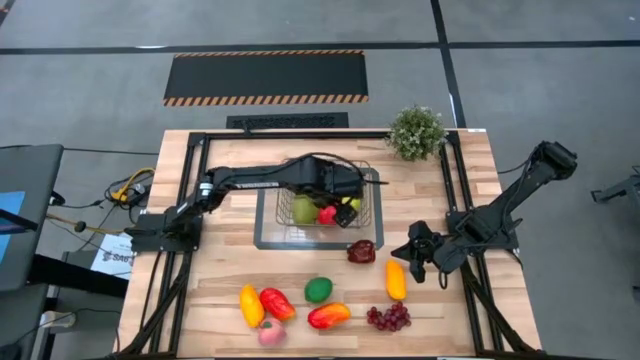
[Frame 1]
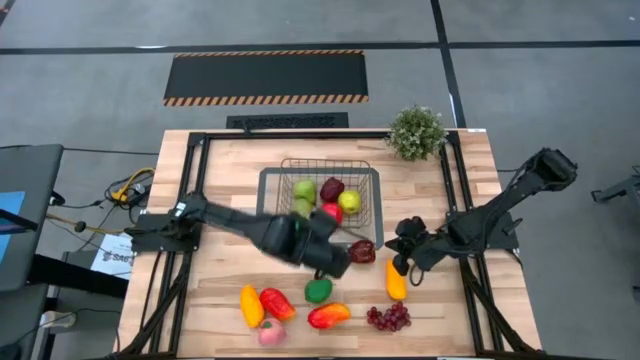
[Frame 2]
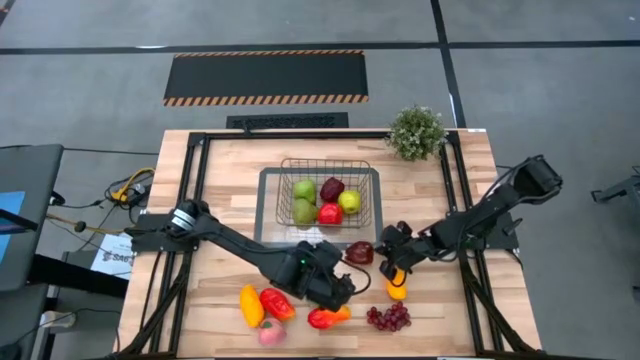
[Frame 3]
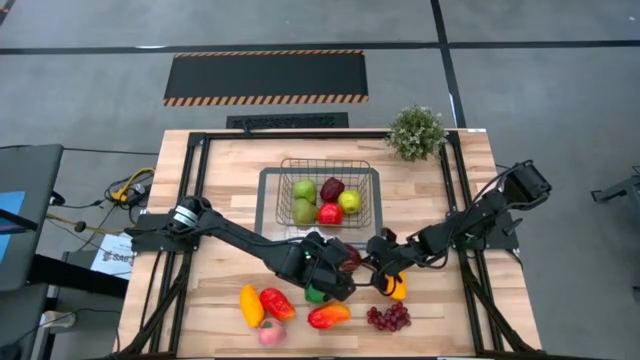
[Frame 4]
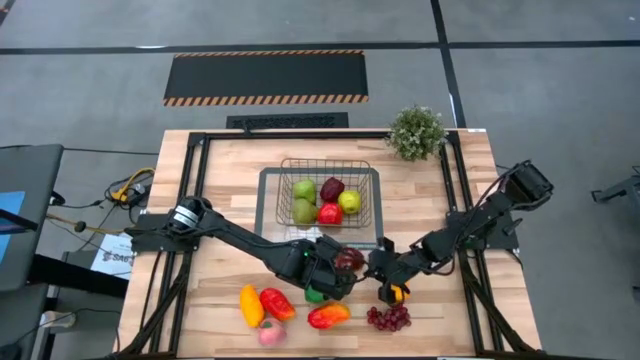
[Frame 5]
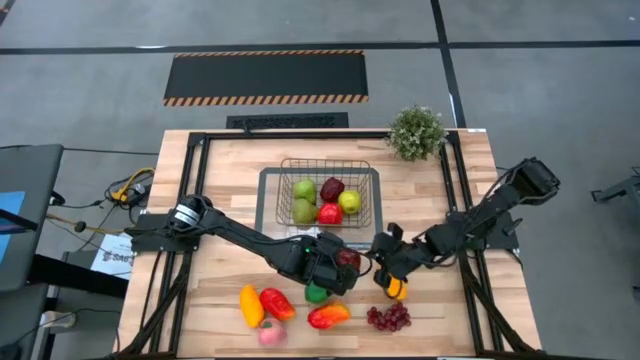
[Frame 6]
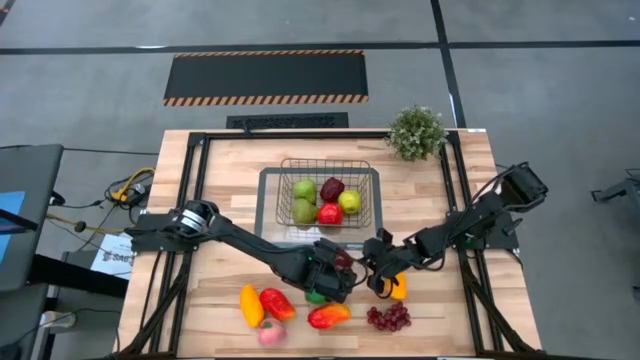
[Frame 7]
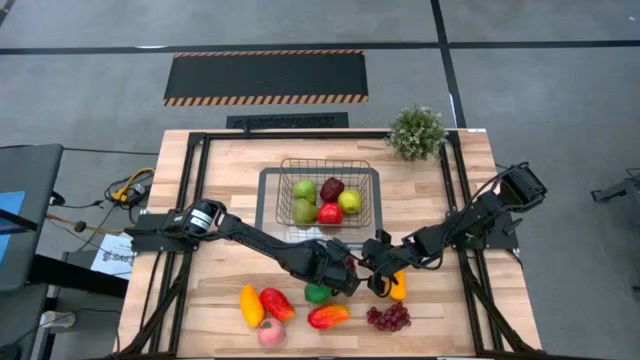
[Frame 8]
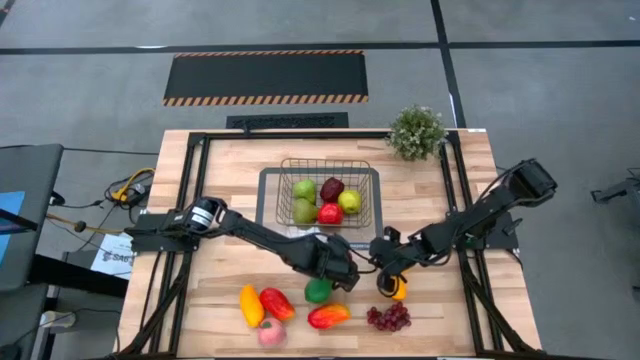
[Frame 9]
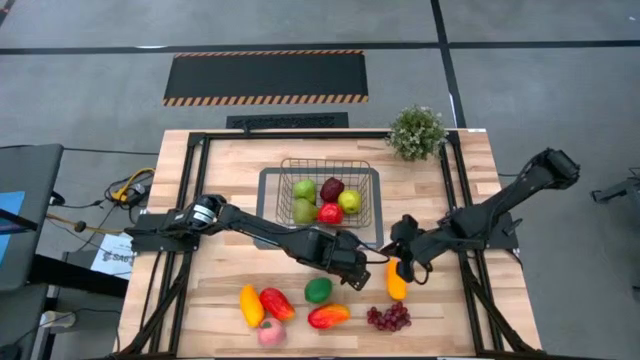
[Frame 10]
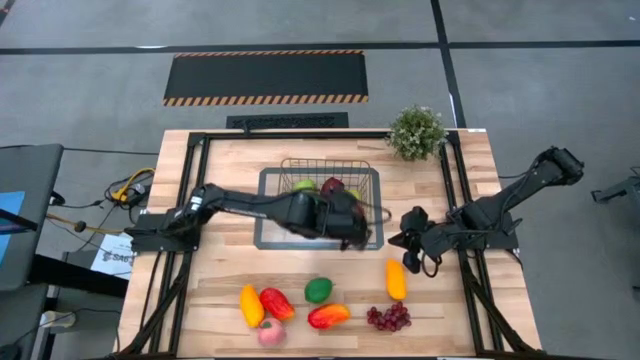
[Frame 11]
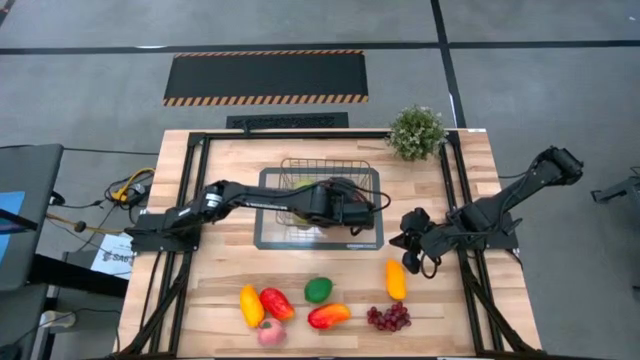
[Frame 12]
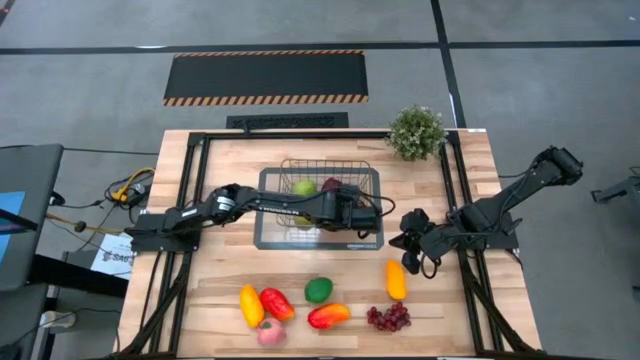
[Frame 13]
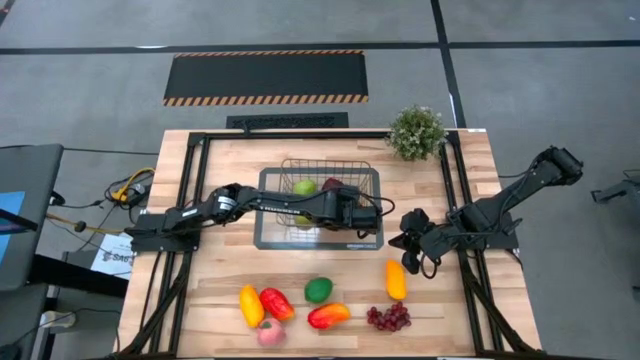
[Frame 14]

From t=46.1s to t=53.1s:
Task: Build produce basket
Put the dark red apple into the bin

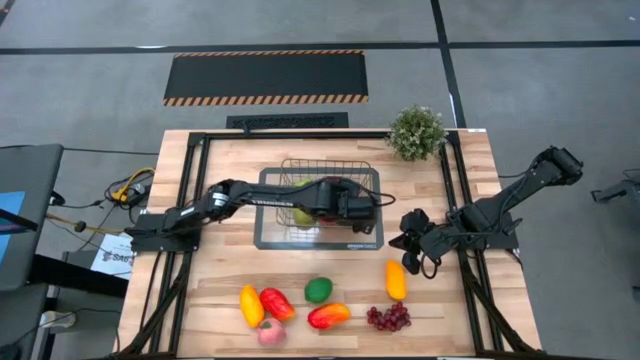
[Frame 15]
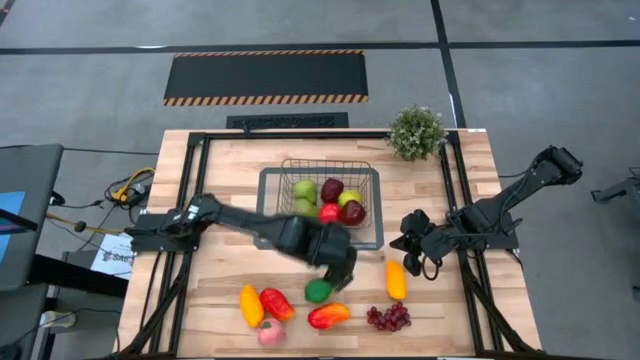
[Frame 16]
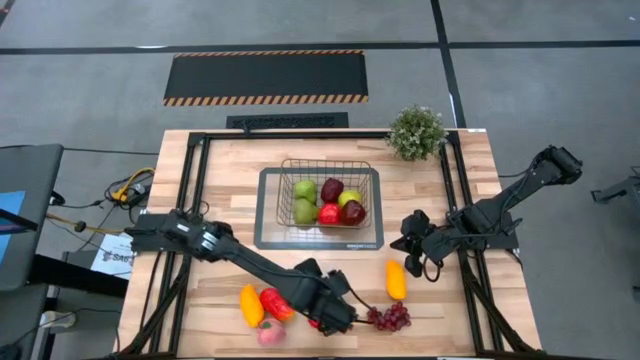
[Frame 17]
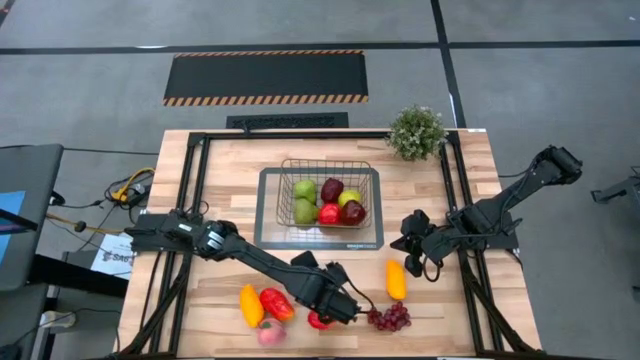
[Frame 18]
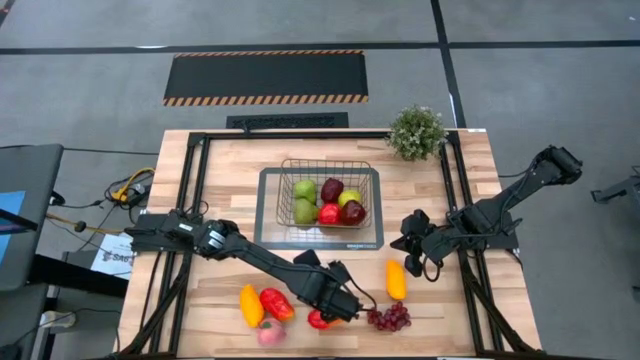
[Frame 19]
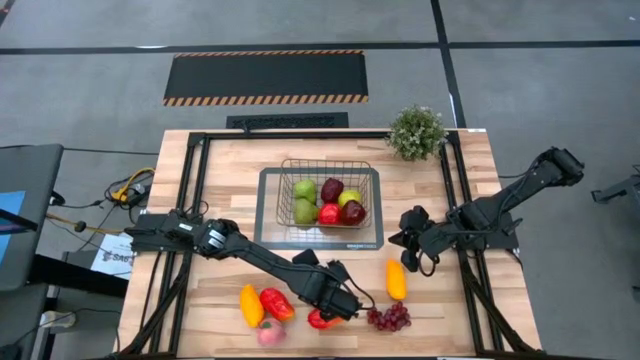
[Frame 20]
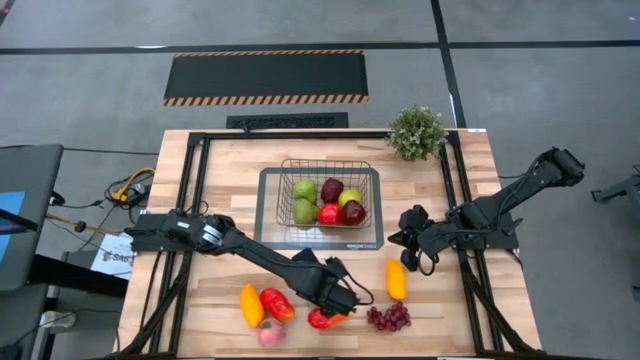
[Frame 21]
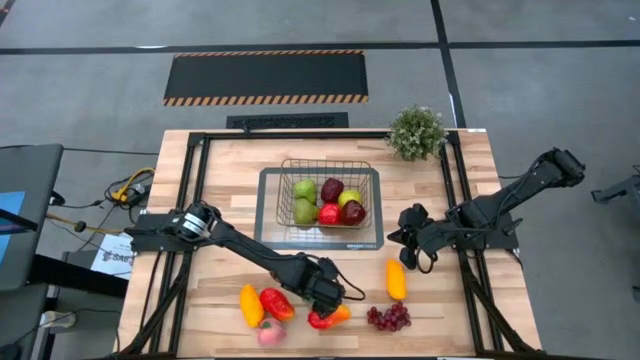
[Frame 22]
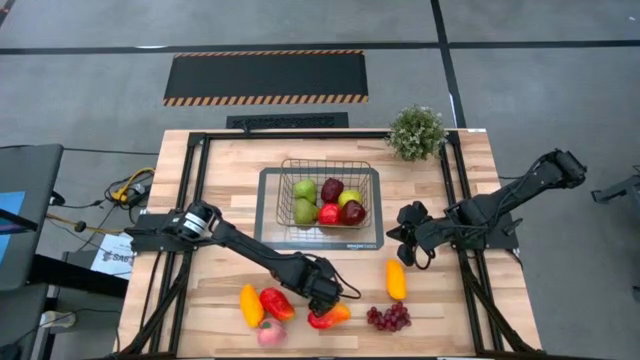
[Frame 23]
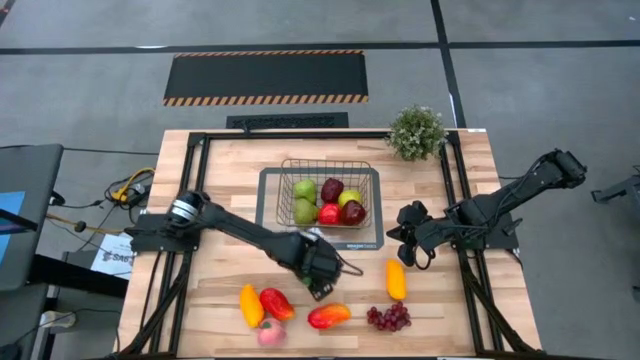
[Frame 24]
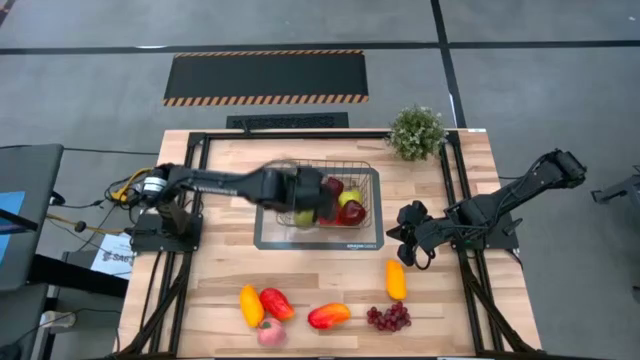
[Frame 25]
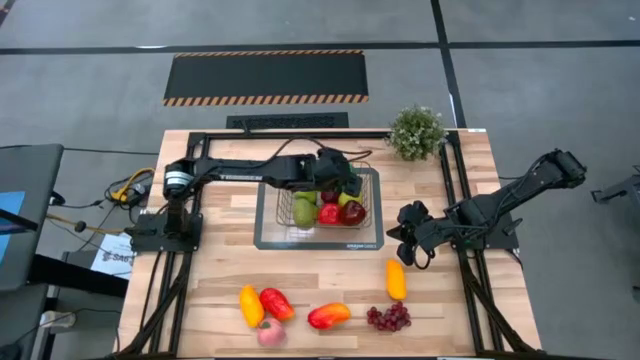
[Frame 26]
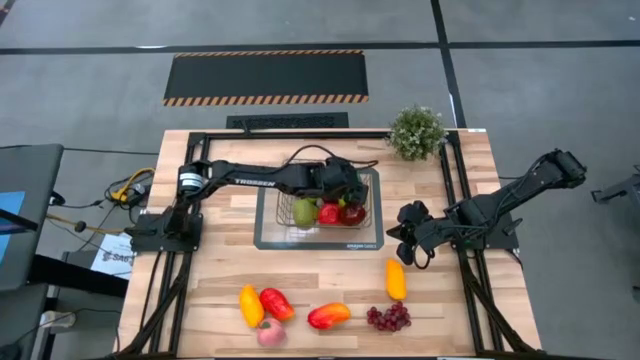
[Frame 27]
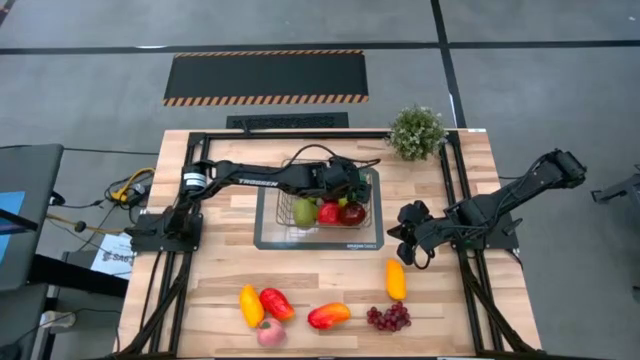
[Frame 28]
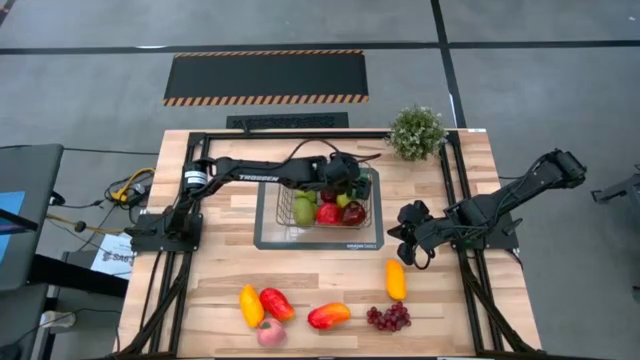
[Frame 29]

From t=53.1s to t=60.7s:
Put the dark green lime into the bin

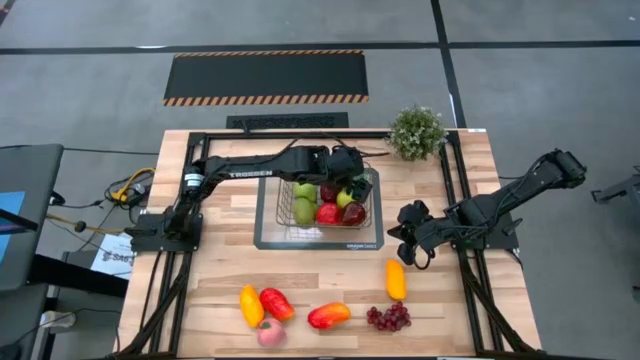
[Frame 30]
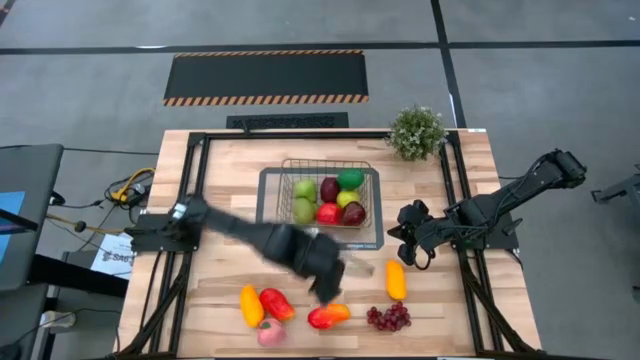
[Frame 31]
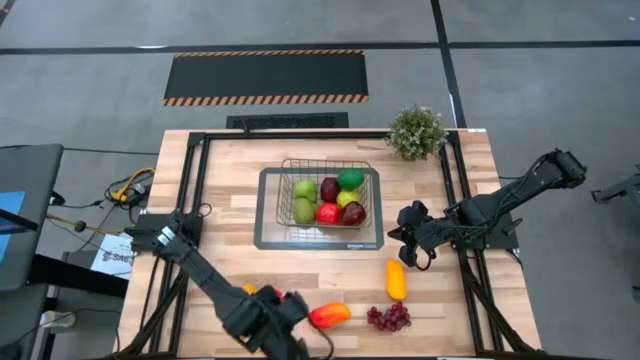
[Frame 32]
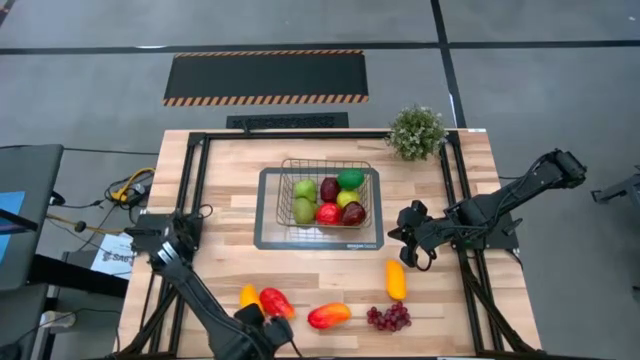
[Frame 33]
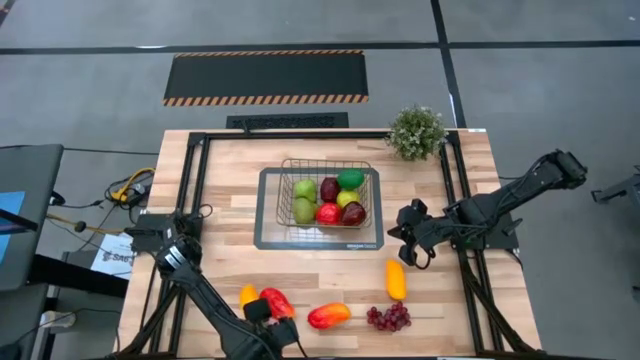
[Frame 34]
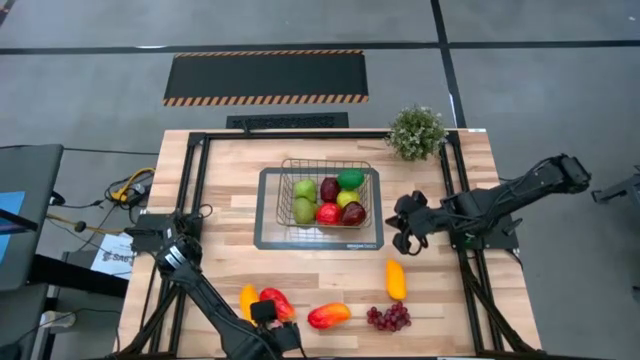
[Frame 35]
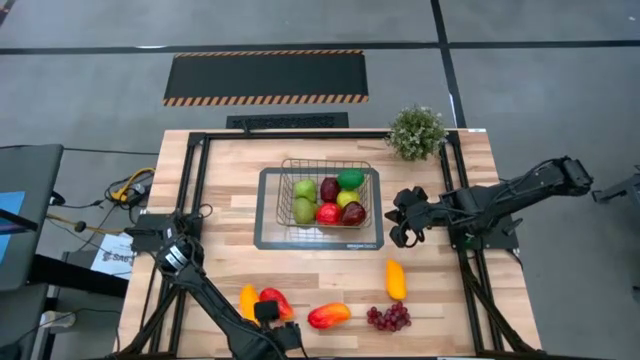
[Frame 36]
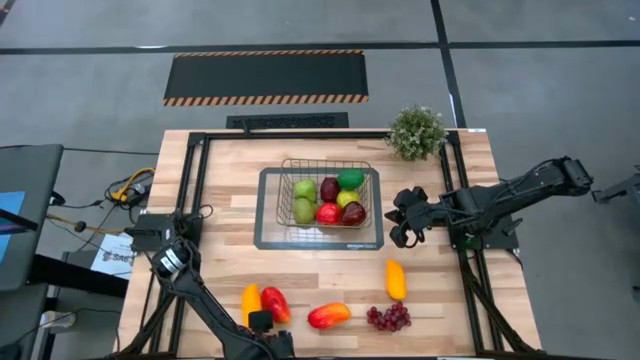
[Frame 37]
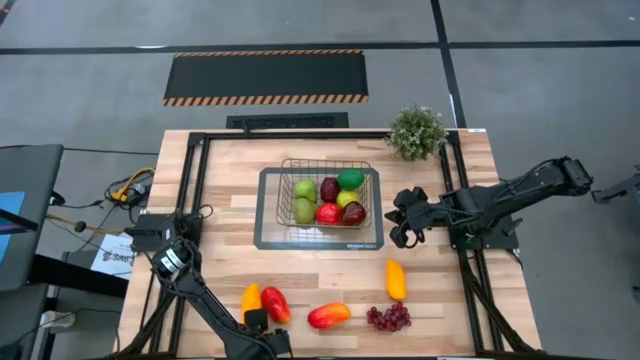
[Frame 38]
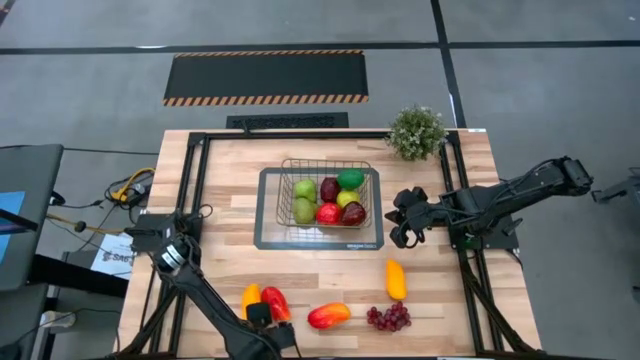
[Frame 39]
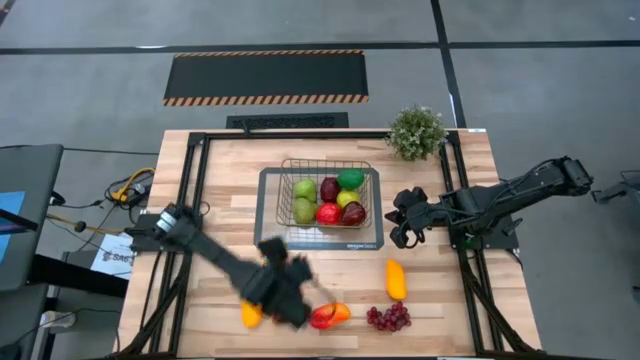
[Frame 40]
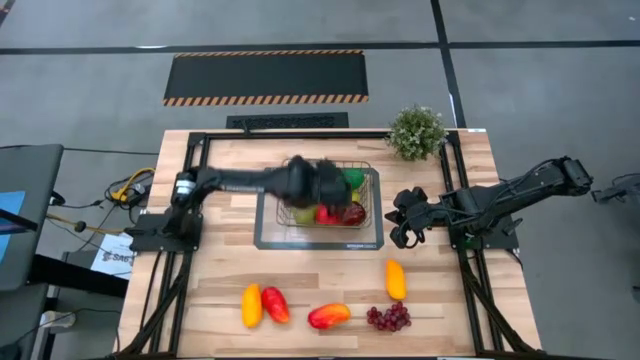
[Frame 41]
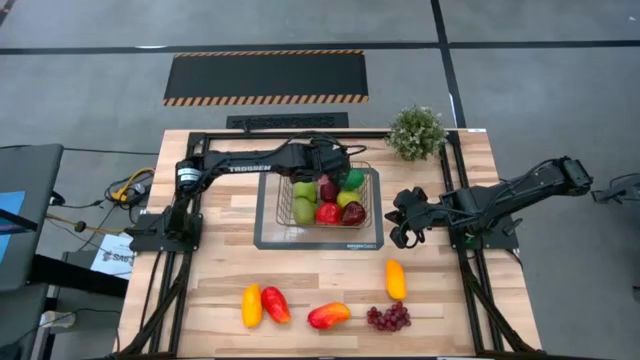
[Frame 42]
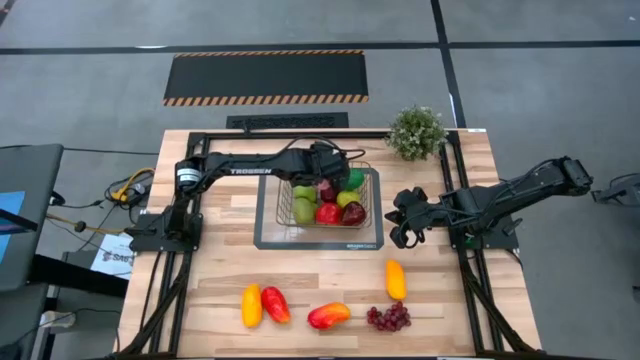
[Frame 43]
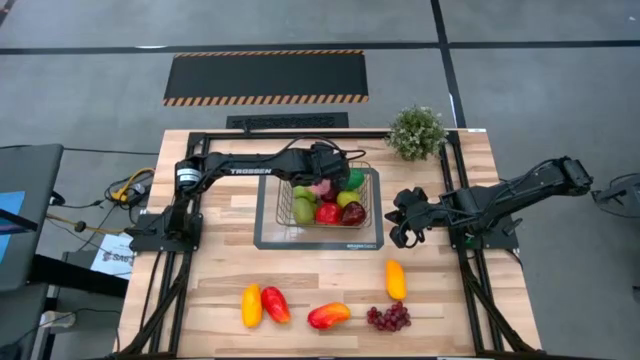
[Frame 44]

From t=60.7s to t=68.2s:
Put the pink peach into the bin

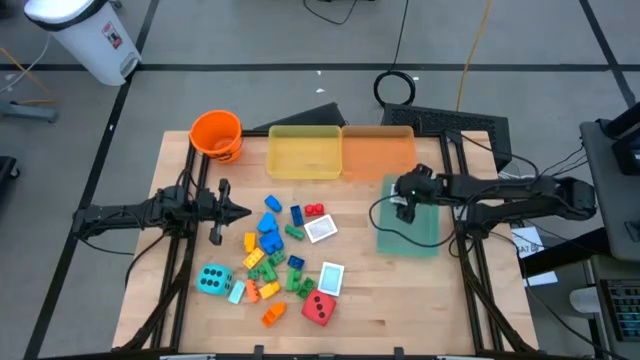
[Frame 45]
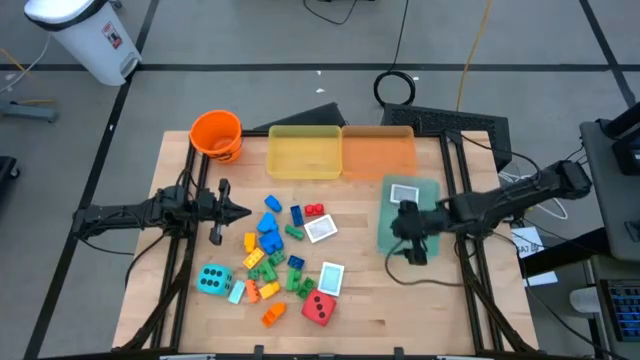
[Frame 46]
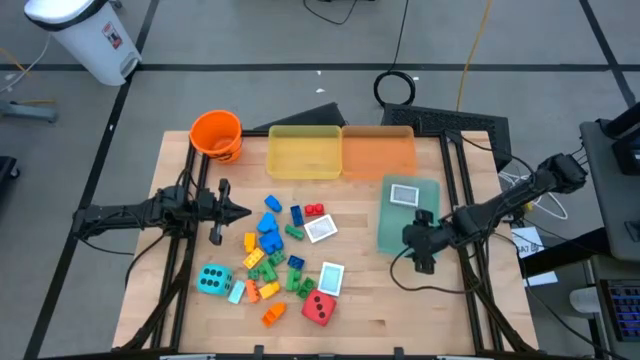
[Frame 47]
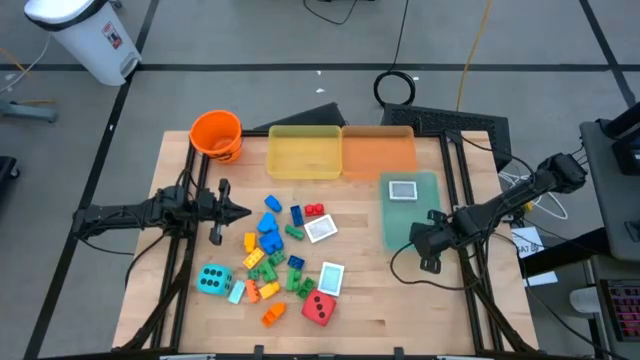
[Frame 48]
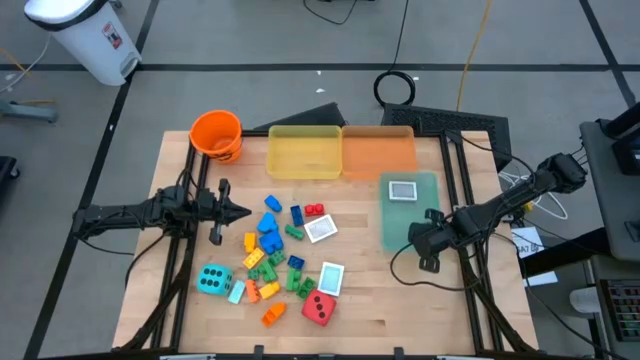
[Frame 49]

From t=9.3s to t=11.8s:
Task: Pick & Place Toys
Adjust the blue bin
